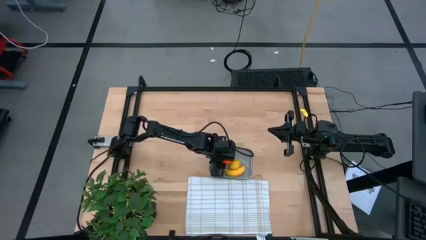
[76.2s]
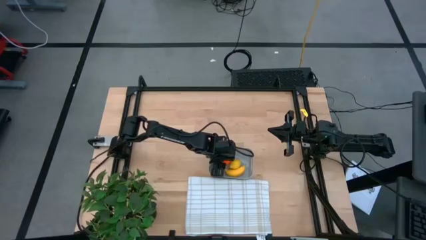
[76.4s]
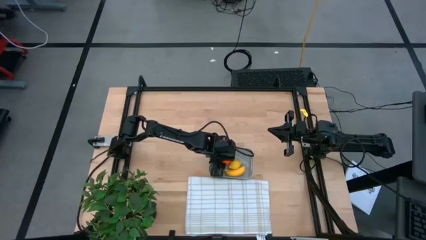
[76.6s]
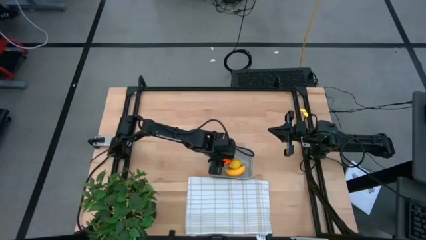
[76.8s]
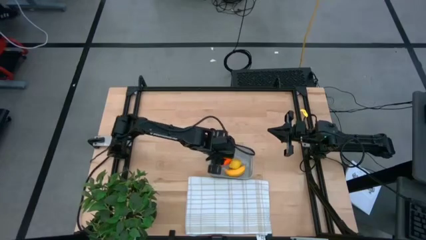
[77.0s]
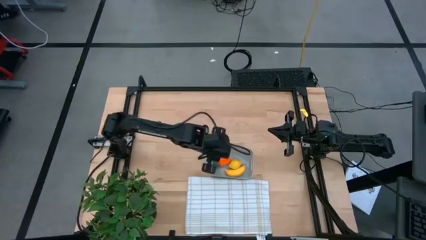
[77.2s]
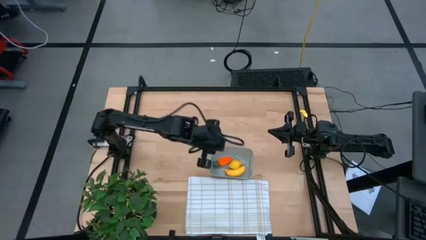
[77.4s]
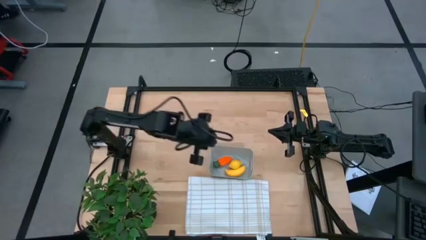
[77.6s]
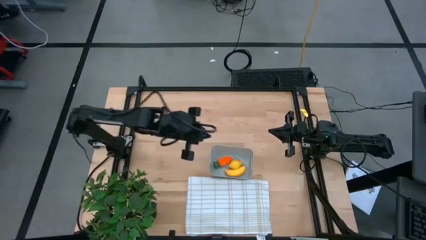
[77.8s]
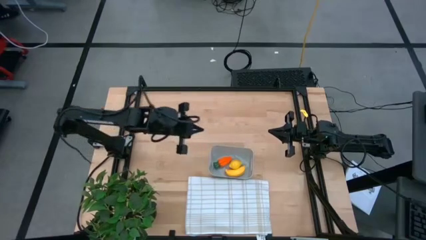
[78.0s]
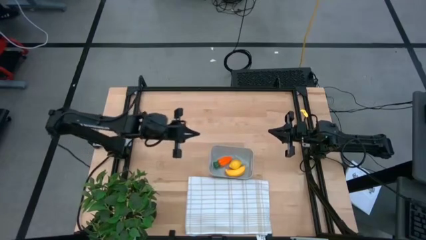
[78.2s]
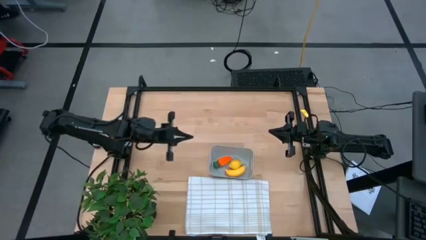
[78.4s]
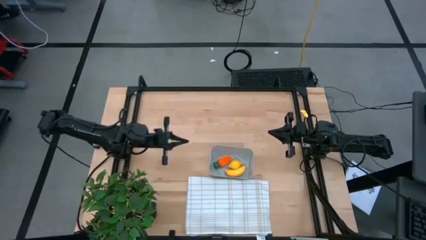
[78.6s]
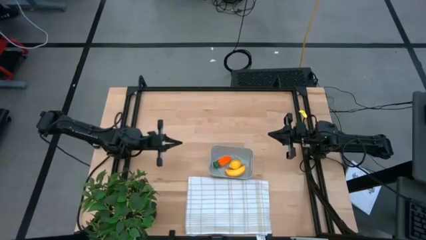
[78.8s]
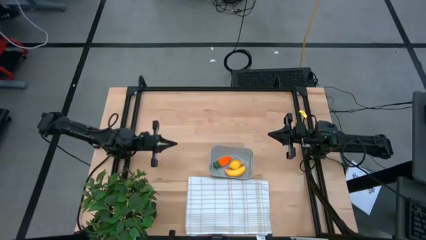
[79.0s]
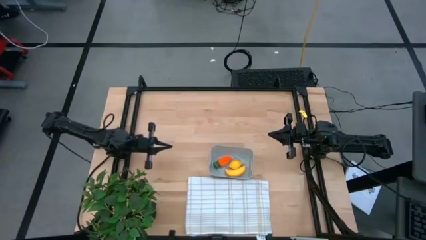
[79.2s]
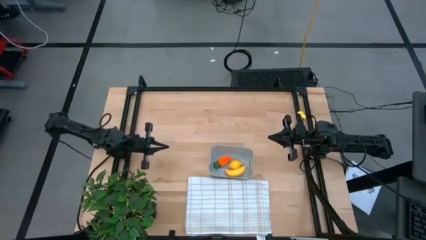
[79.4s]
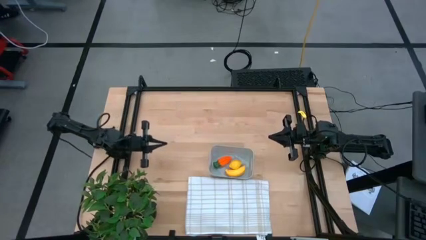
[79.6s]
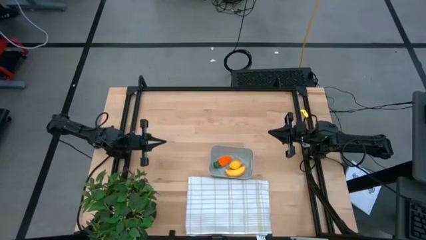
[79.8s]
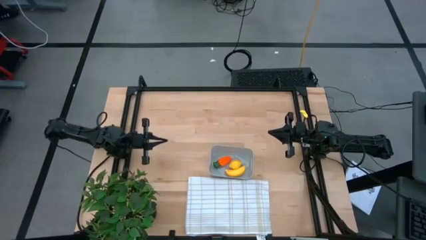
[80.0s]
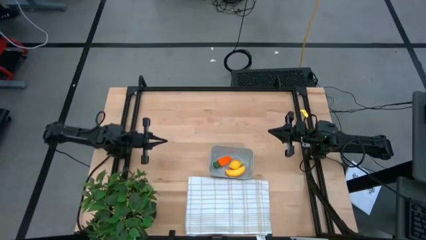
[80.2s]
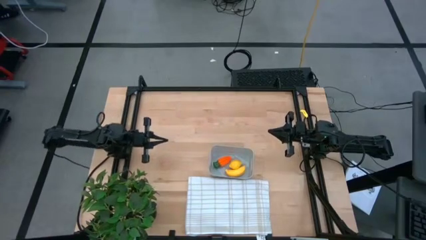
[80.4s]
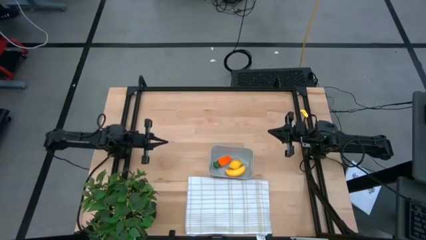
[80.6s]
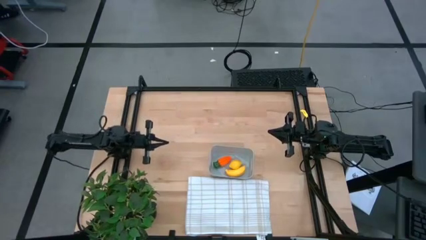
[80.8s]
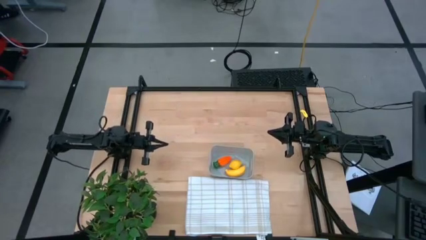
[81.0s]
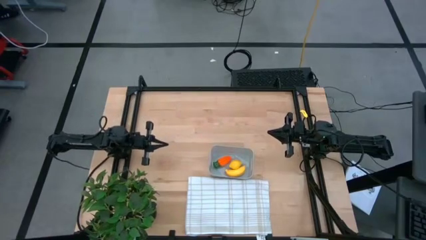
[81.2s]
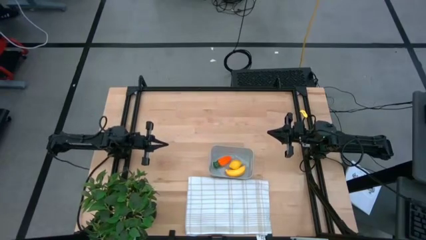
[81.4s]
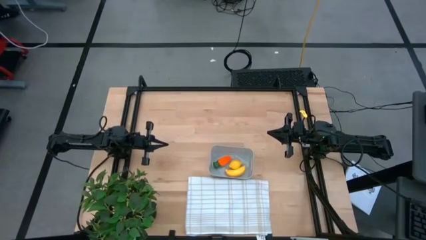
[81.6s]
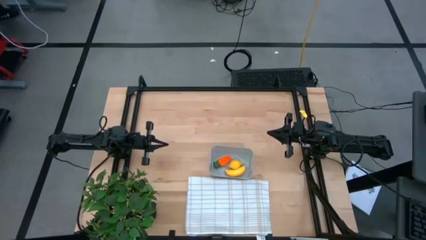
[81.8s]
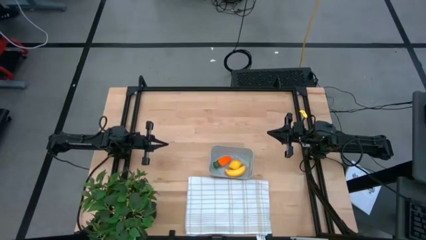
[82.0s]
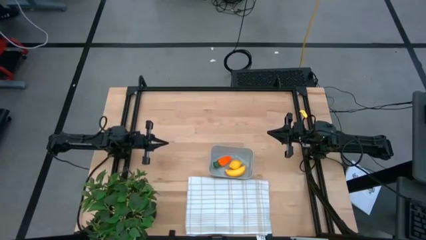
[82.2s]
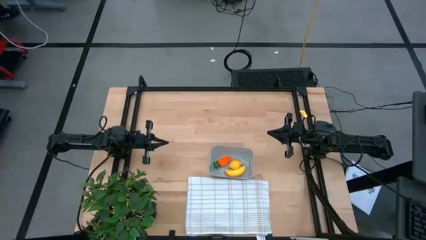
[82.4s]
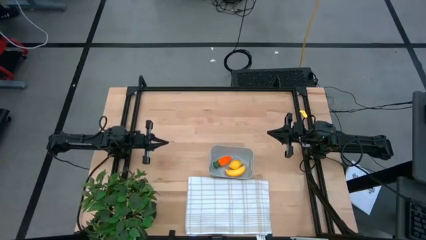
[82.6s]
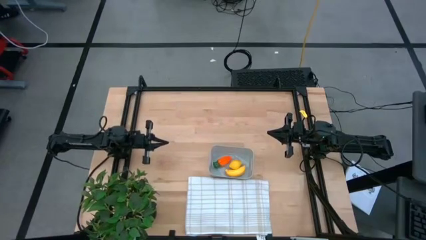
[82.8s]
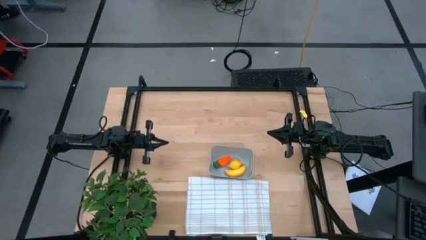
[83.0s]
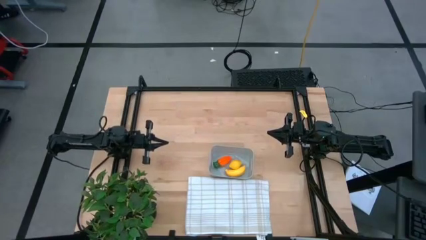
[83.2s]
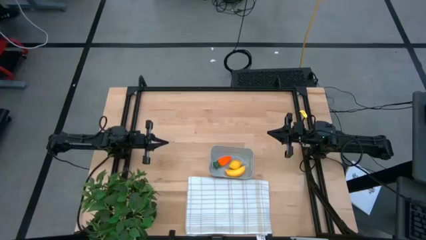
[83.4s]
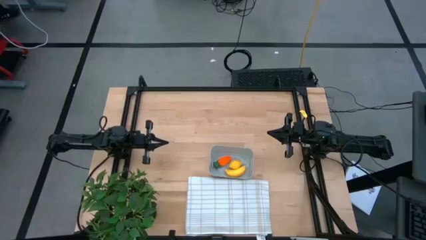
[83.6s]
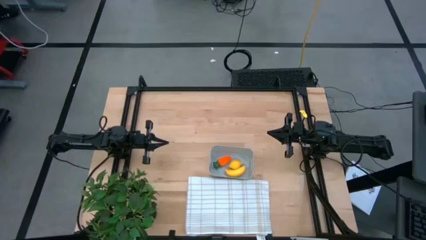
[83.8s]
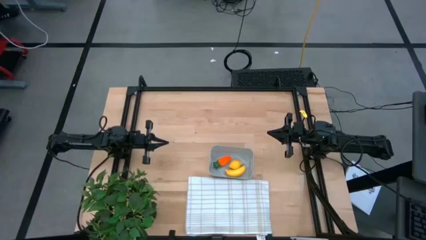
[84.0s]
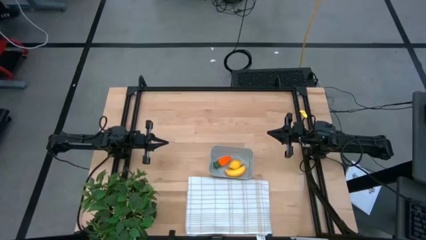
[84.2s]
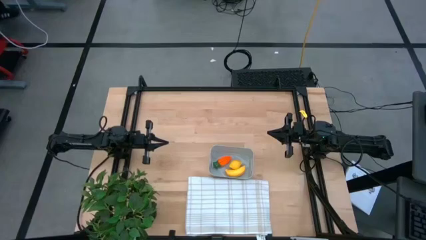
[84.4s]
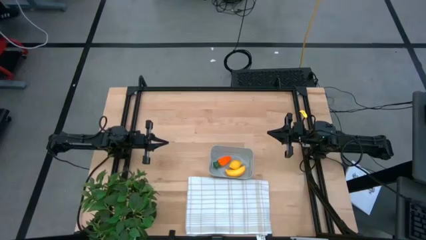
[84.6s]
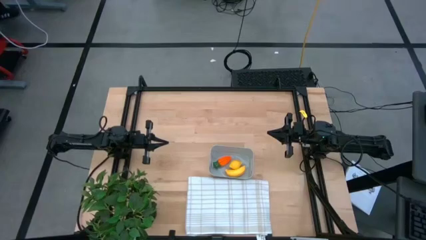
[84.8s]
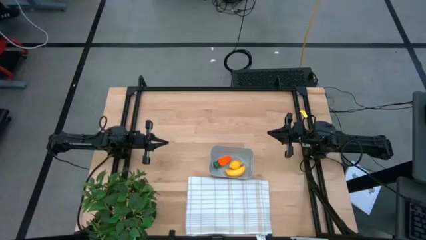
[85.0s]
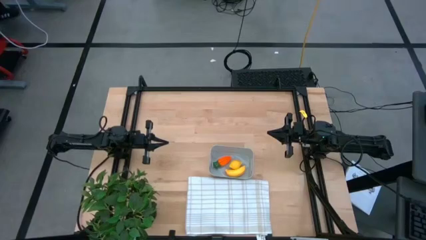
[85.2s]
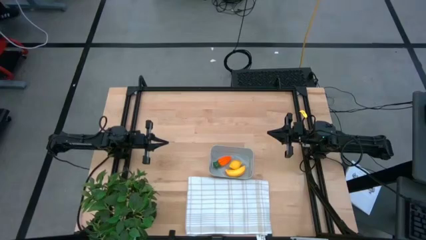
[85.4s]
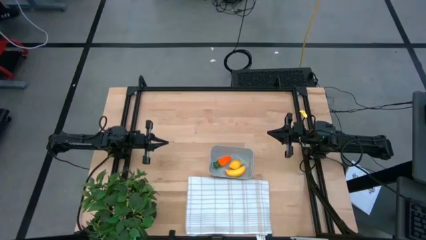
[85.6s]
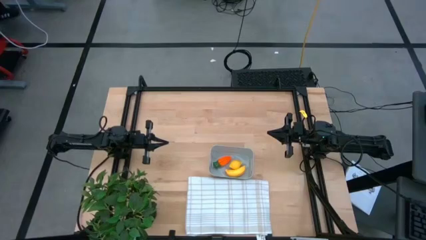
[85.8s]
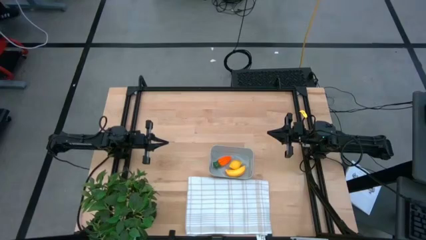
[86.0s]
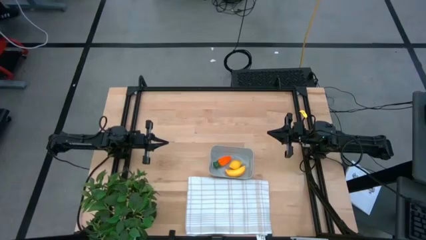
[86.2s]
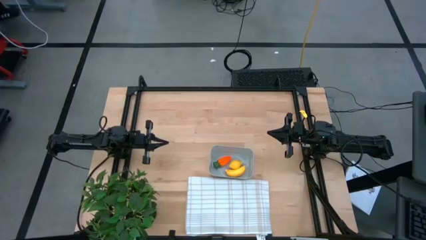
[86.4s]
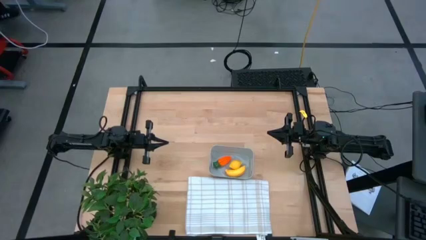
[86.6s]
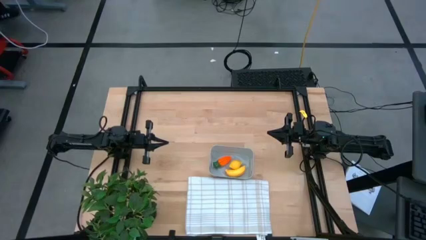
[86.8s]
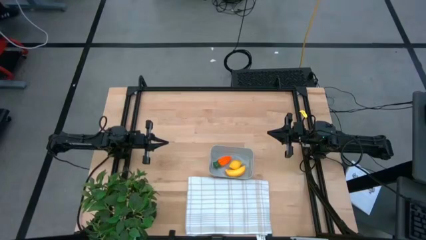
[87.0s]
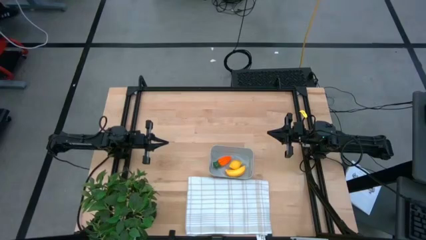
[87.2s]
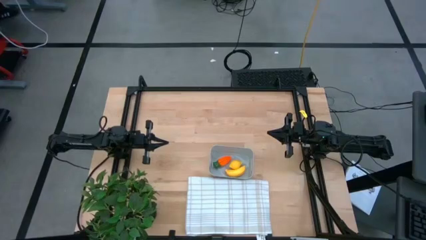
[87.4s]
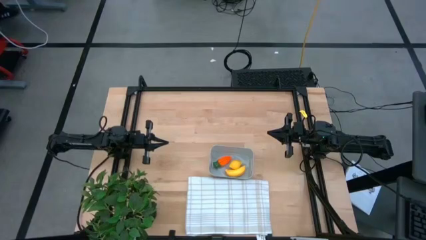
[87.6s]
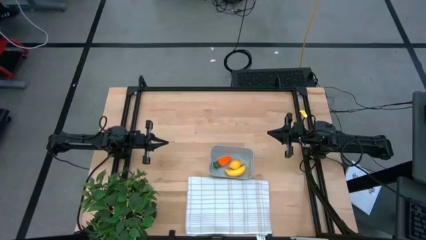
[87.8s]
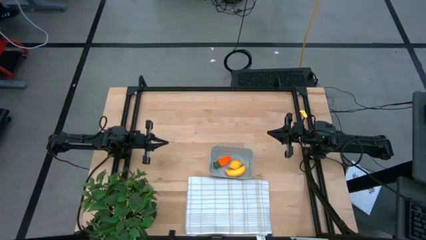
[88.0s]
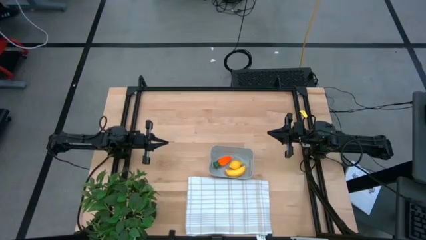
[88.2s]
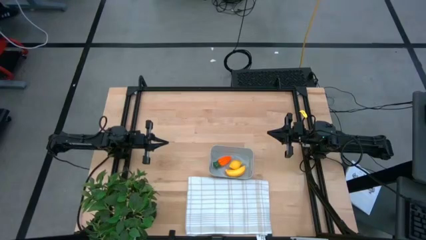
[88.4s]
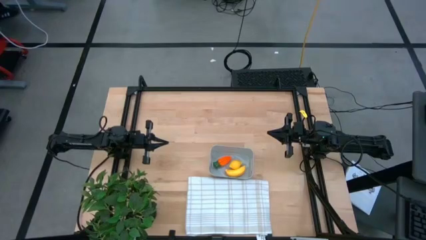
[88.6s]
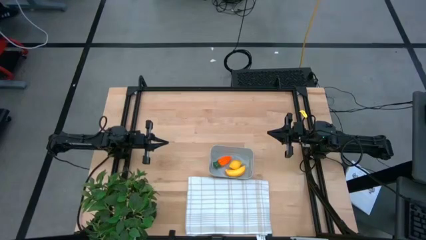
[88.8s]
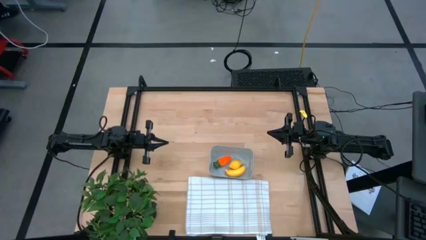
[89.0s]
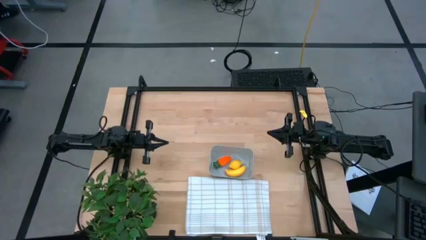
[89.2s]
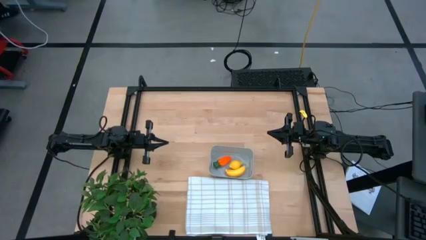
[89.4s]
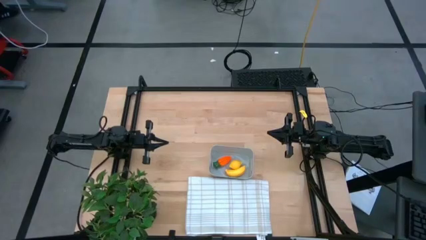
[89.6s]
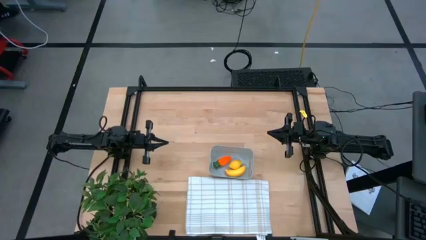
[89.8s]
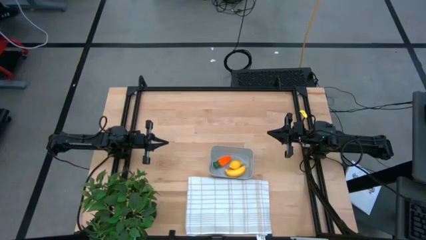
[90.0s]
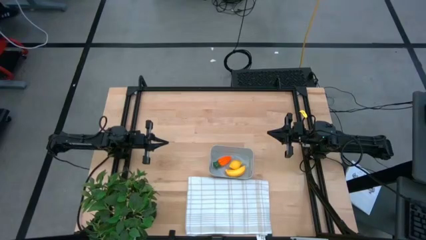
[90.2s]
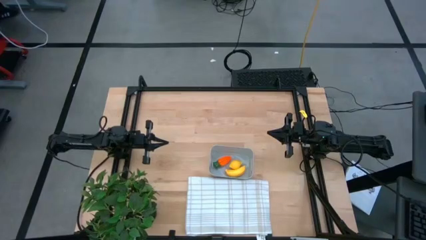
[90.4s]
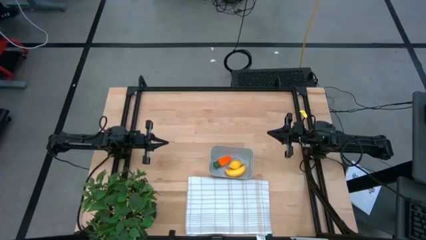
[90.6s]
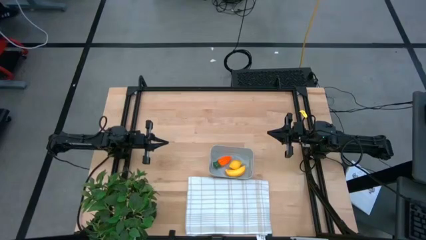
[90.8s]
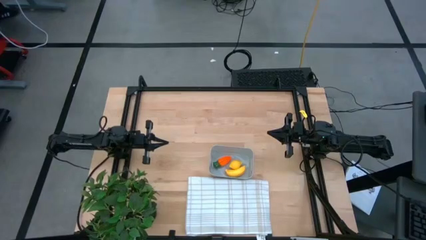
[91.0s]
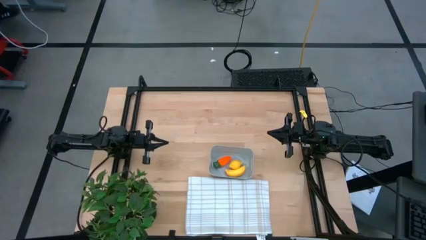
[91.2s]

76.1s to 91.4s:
Task: Pick and placing Produce into tupperware
Return to Home Position
